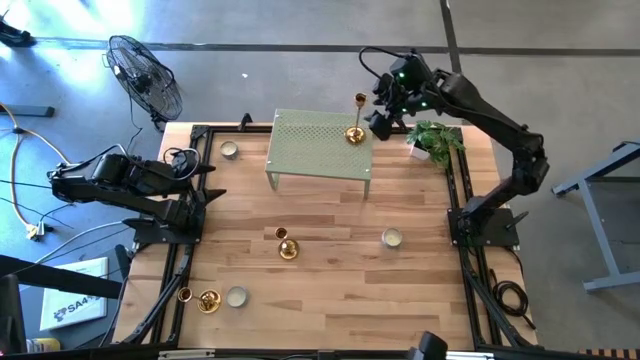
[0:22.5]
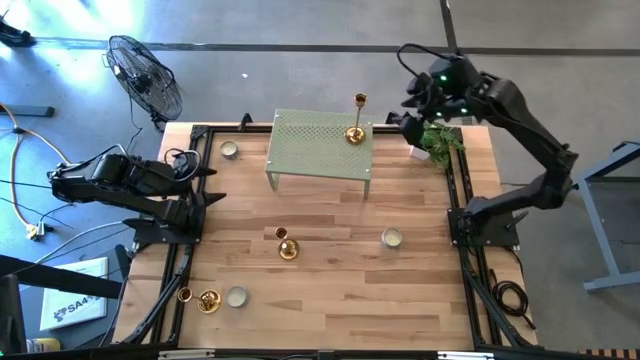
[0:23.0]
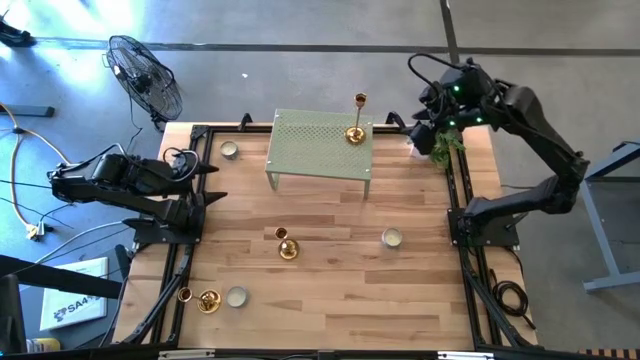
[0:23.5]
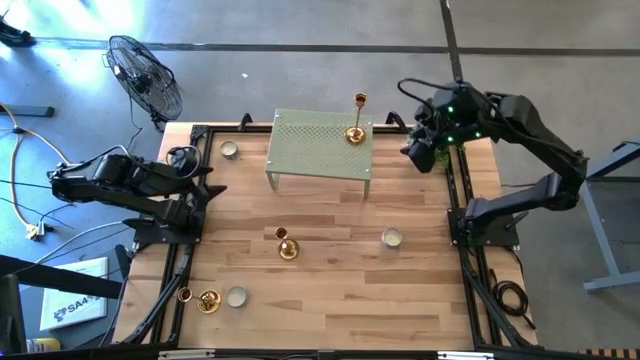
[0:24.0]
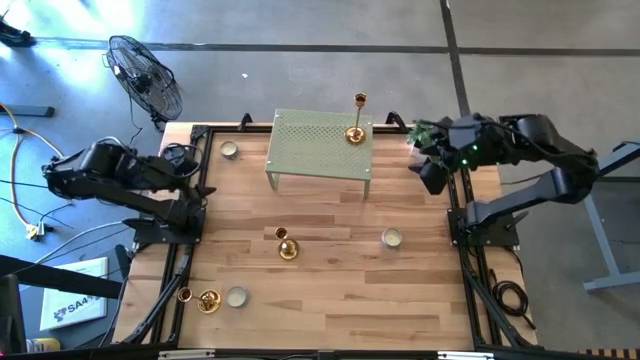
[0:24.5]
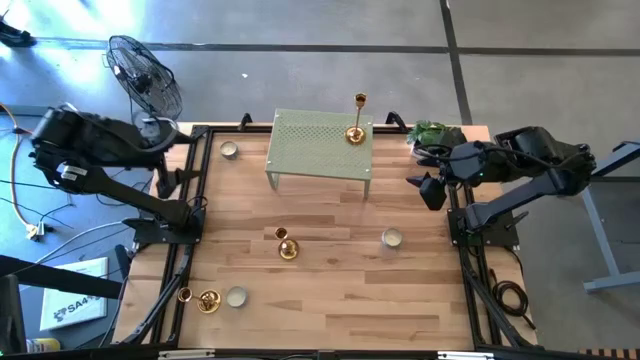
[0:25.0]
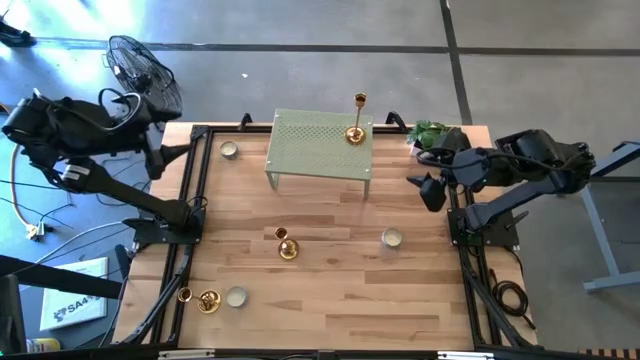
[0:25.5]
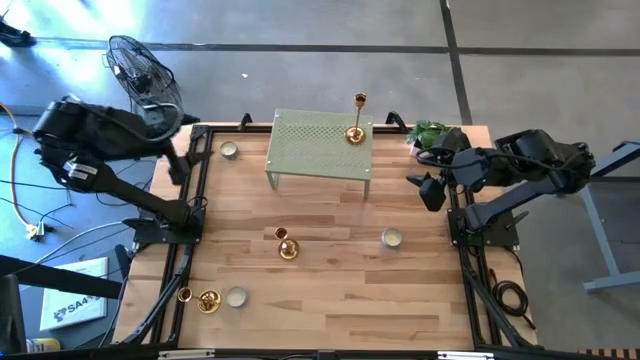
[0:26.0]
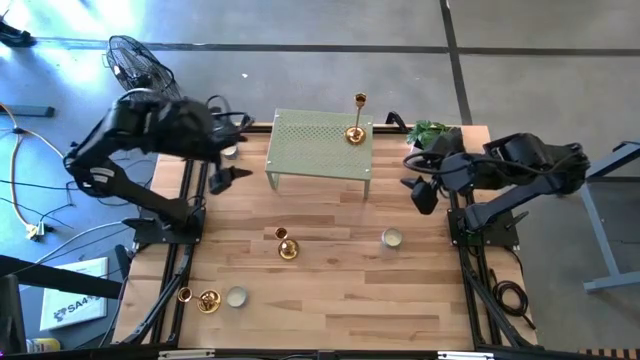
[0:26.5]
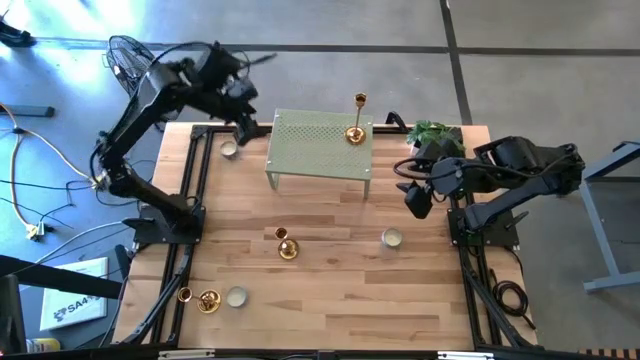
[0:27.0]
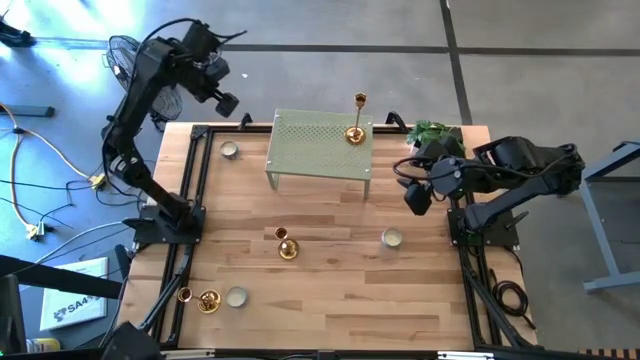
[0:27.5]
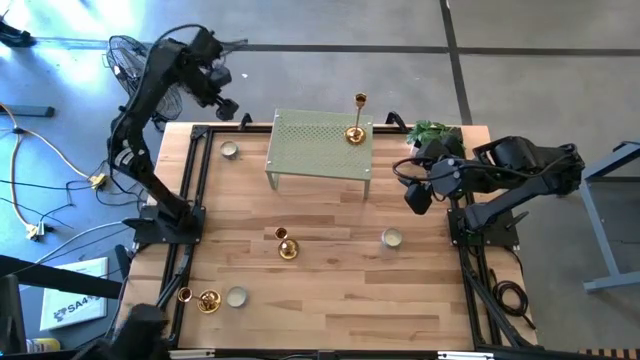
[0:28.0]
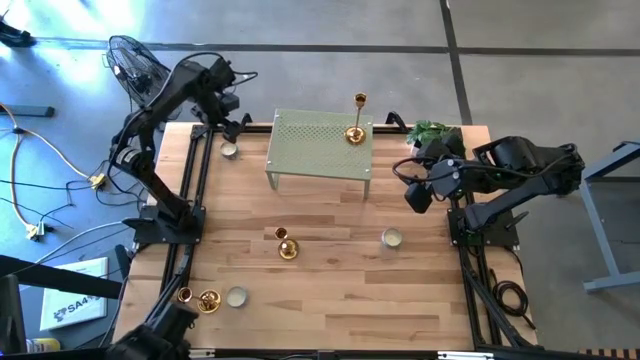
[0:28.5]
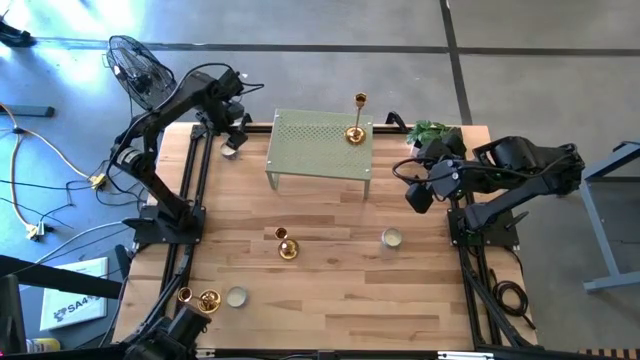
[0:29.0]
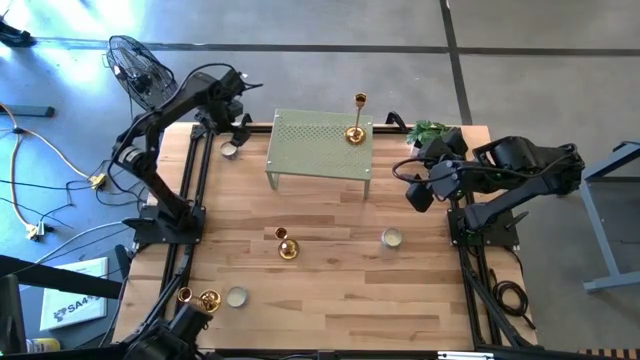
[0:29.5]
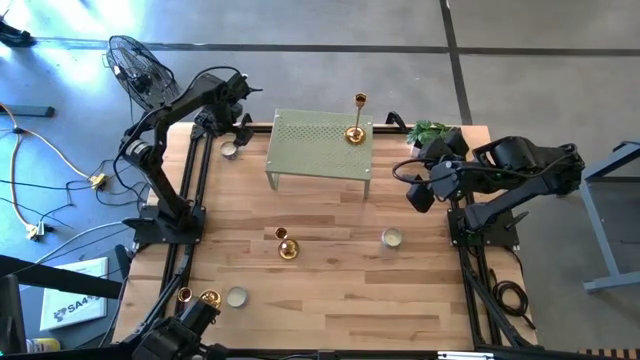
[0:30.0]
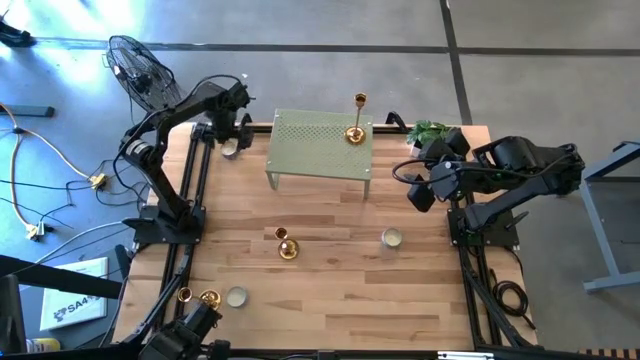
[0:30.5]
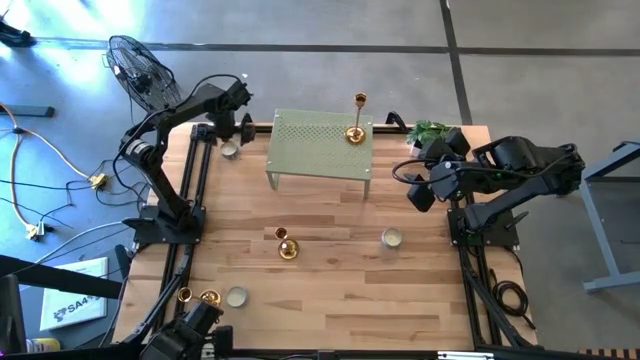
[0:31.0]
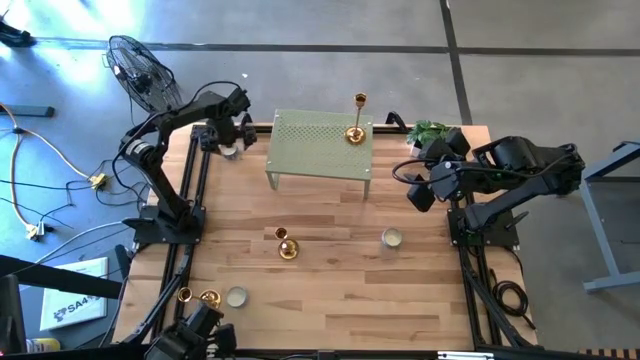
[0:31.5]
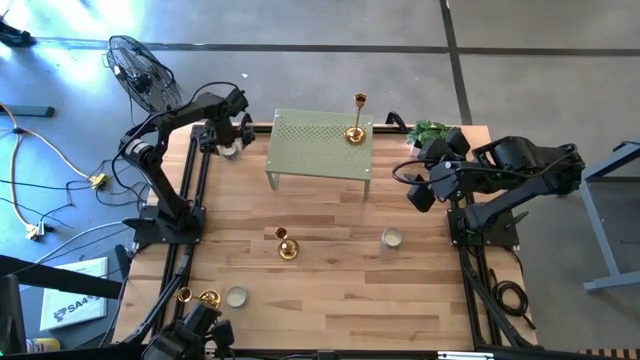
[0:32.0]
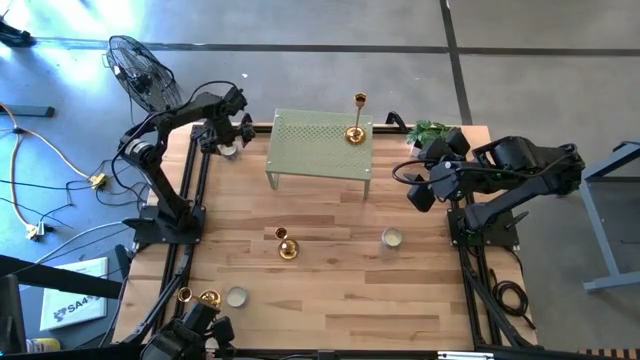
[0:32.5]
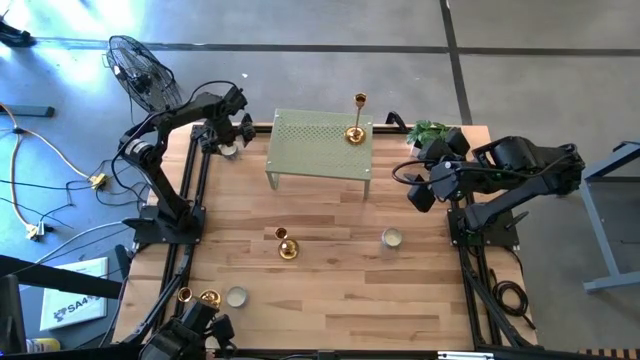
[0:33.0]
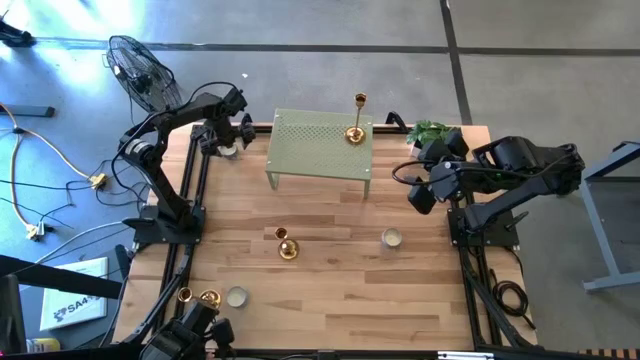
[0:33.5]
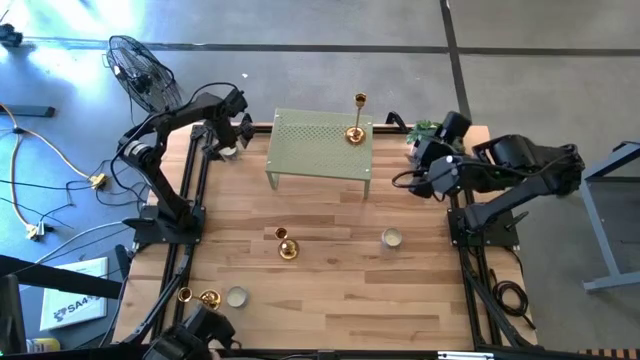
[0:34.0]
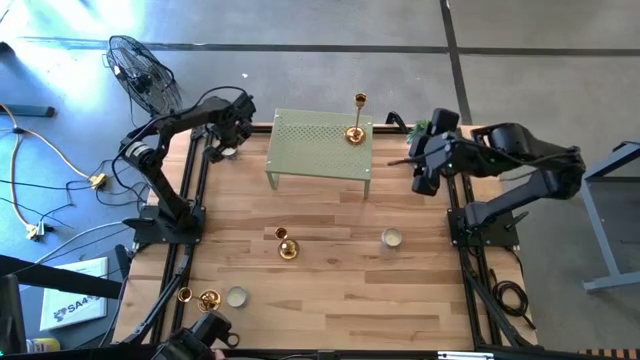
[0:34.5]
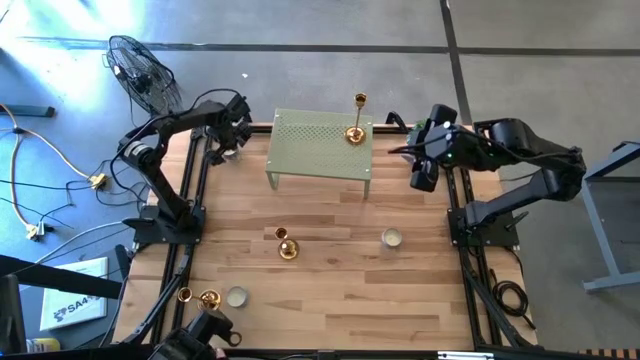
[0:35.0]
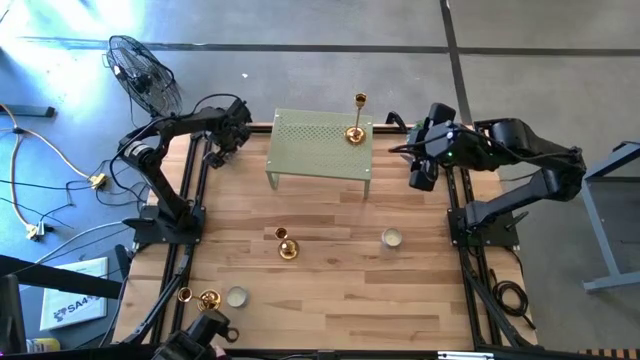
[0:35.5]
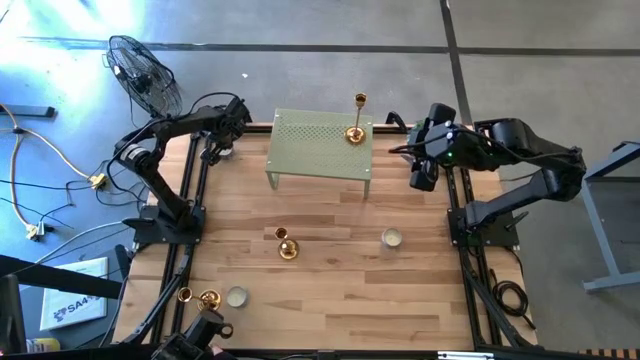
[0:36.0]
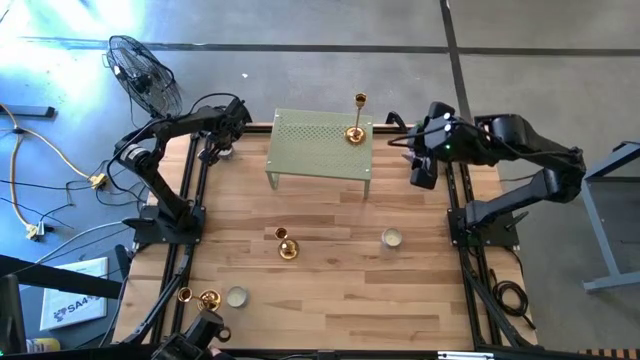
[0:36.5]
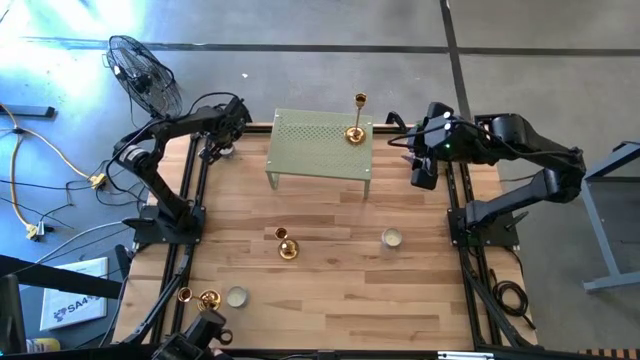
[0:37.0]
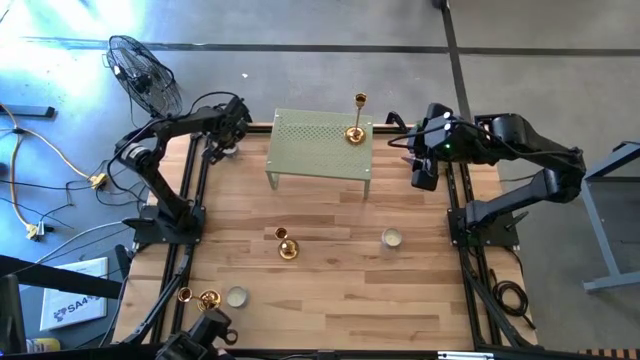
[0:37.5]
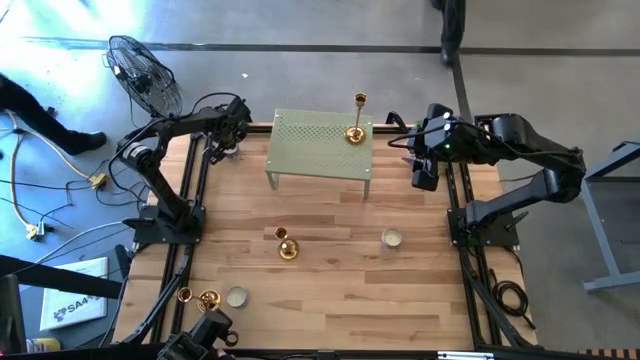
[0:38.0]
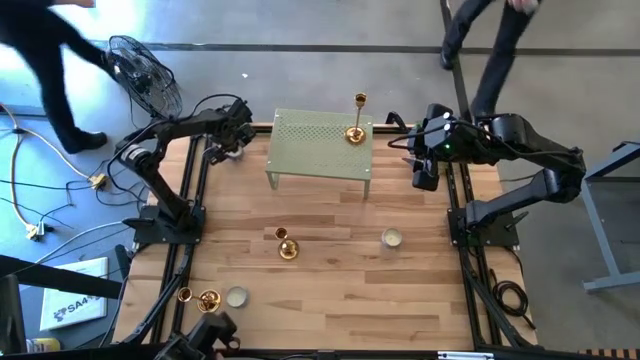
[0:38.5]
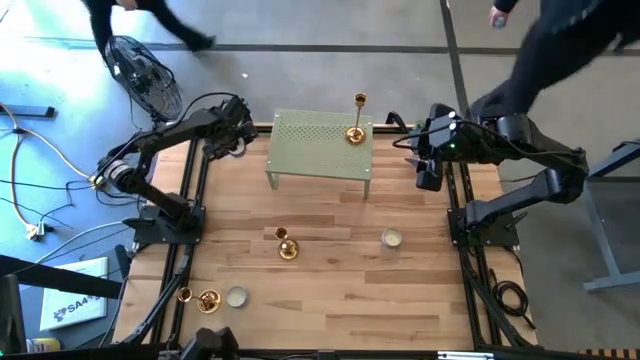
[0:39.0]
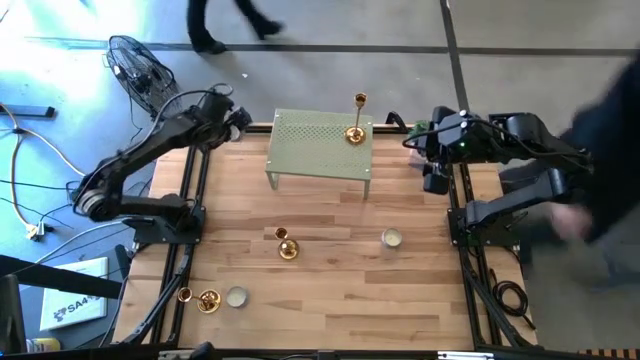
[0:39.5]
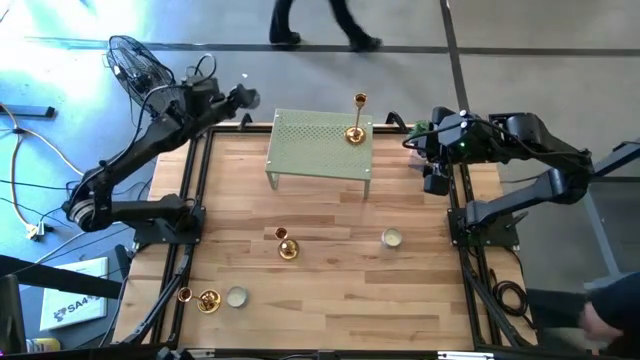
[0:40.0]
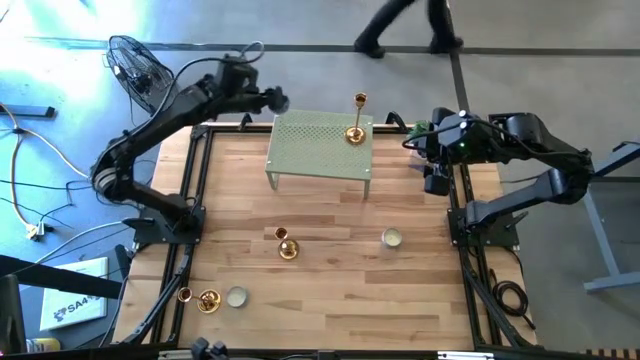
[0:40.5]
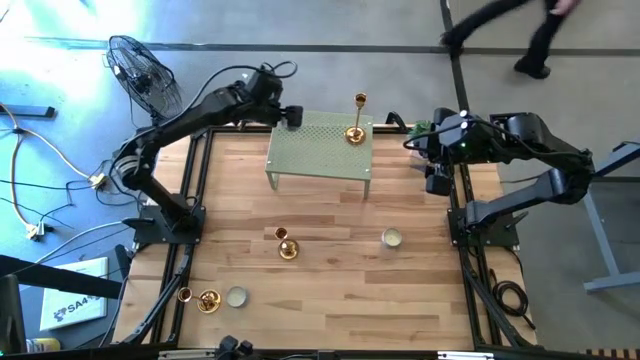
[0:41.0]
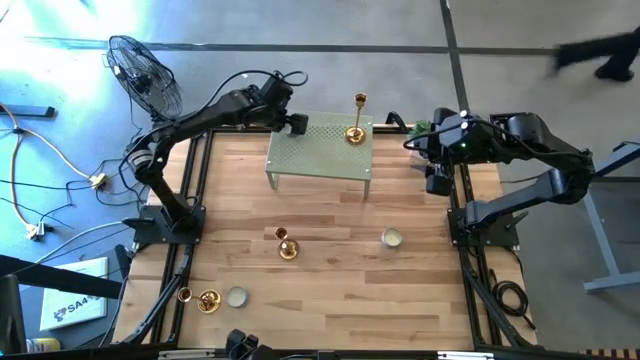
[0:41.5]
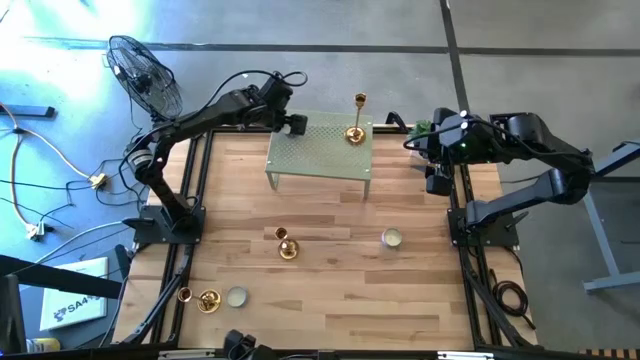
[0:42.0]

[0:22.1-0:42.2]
Task: Stock candles and holders on shelf
Put the dark blue scented candle on the shelf

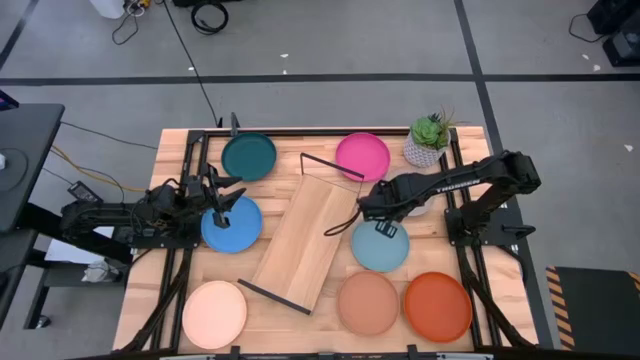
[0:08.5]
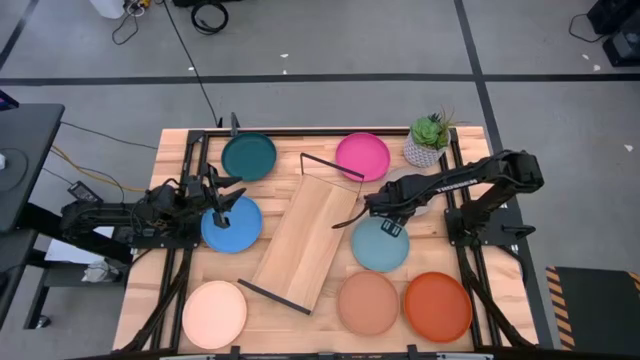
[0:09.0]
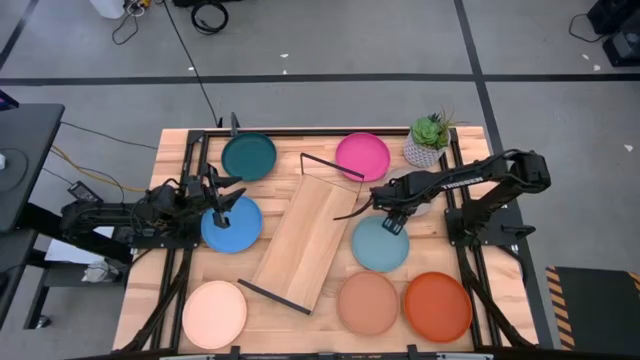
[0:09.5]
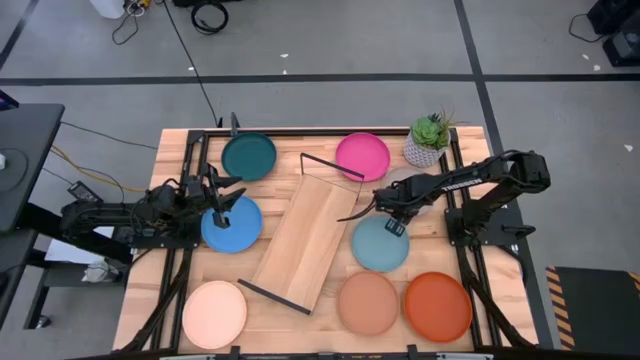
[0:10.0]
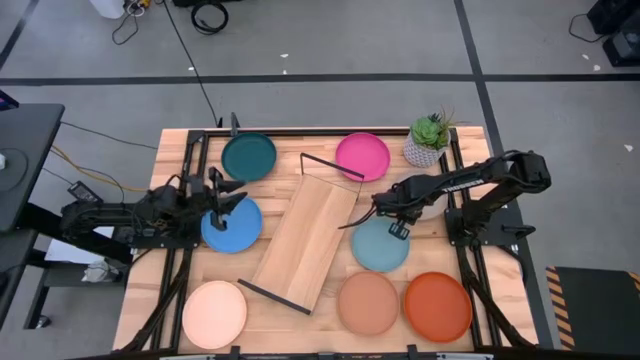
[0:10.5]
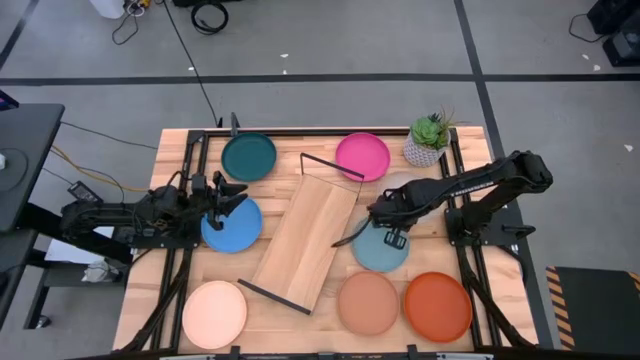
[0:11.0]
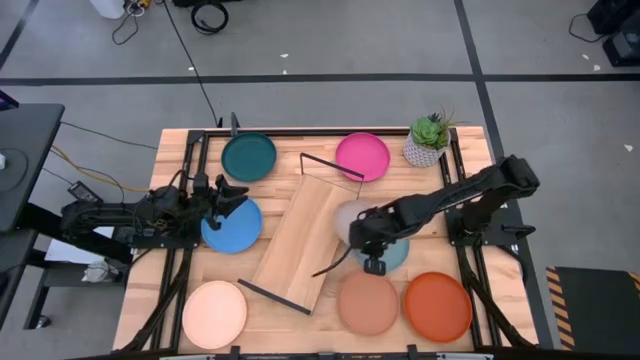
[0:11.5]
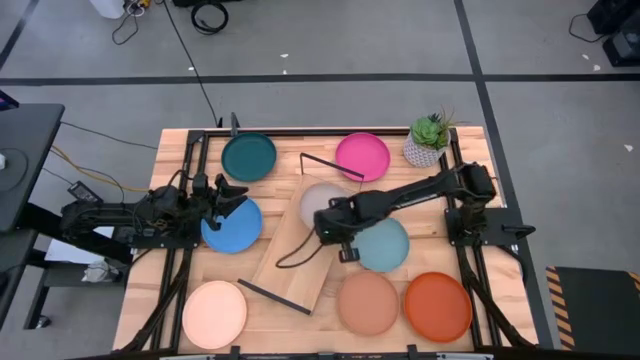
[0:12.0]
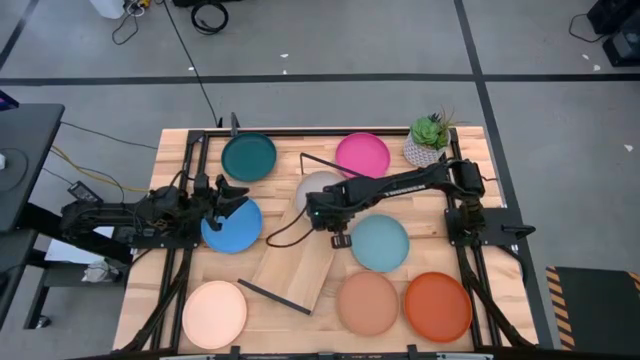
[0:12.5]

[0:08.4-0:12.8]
Task: Place and stack plates onto a shelf
Put the gray plate on the shelf
